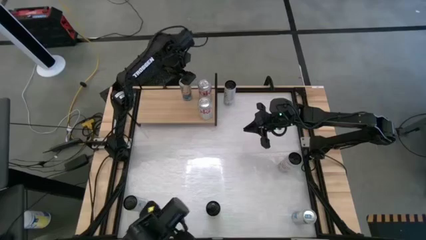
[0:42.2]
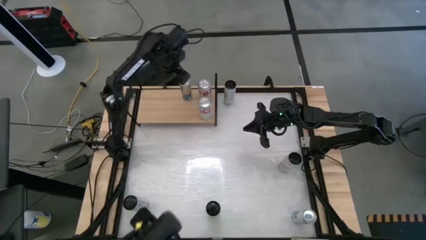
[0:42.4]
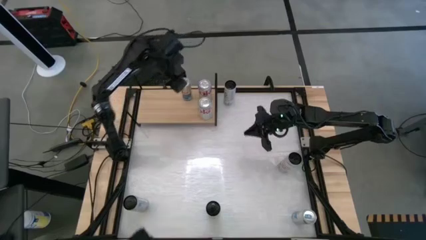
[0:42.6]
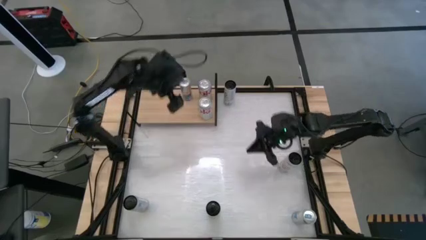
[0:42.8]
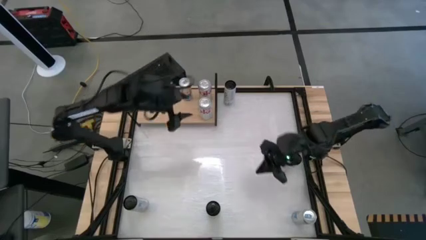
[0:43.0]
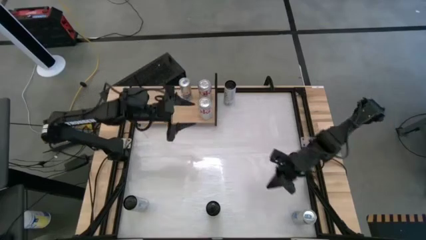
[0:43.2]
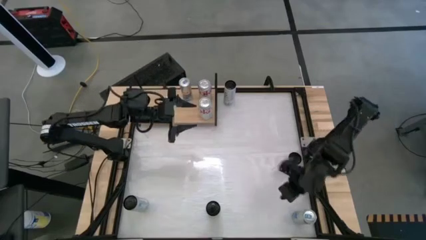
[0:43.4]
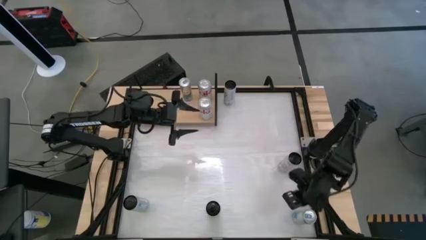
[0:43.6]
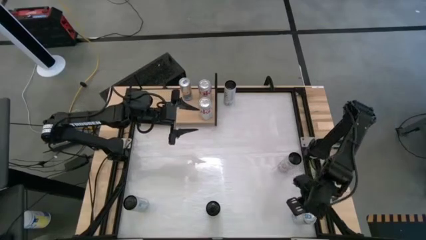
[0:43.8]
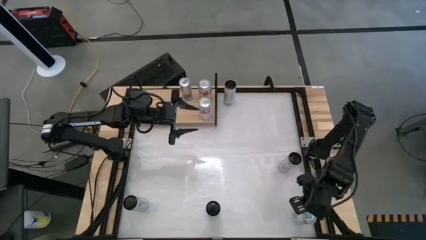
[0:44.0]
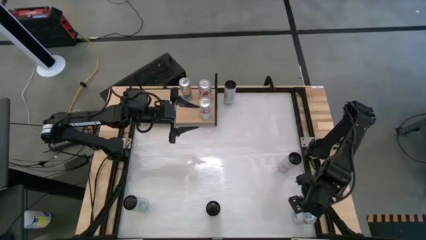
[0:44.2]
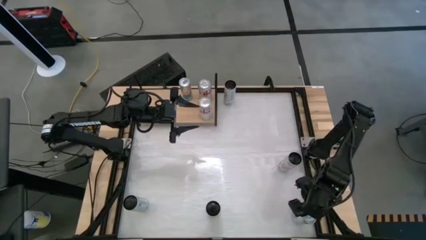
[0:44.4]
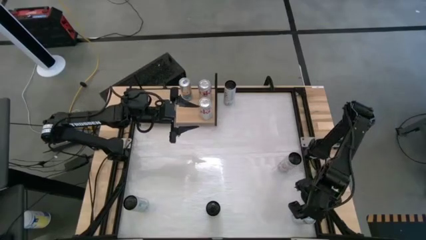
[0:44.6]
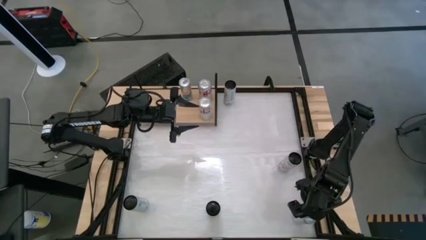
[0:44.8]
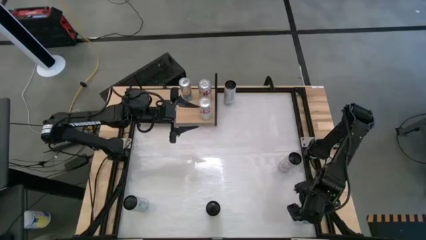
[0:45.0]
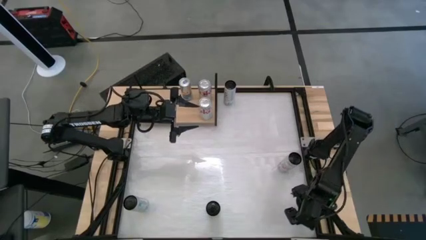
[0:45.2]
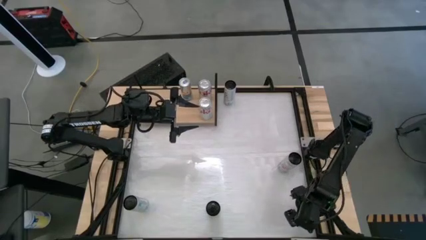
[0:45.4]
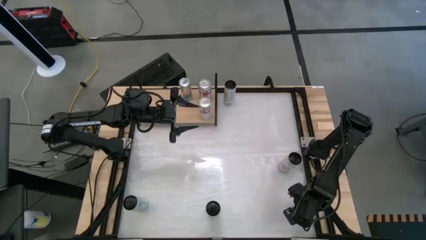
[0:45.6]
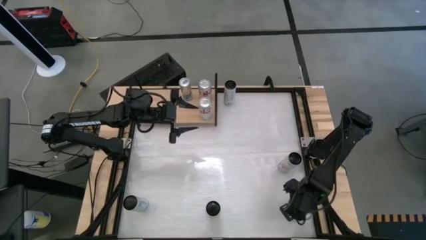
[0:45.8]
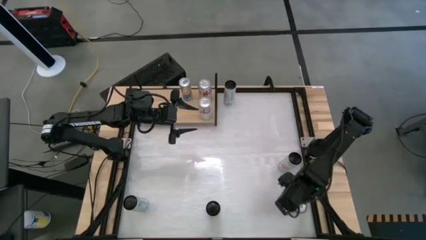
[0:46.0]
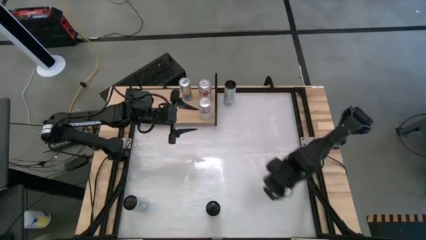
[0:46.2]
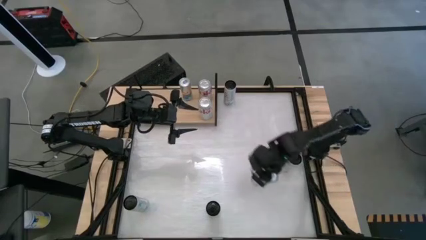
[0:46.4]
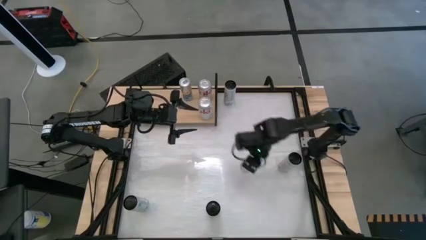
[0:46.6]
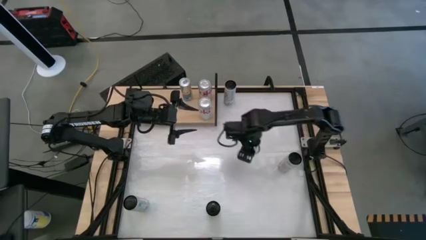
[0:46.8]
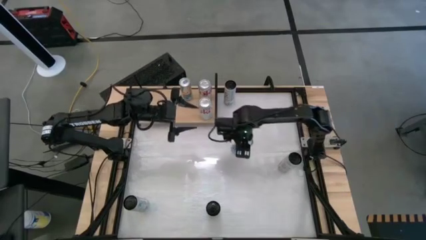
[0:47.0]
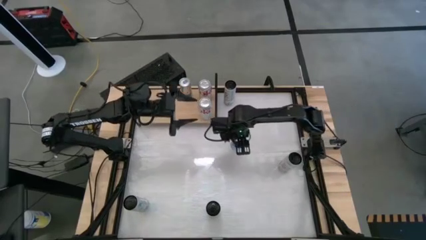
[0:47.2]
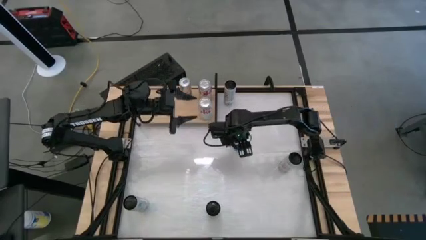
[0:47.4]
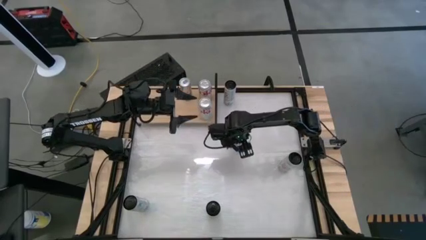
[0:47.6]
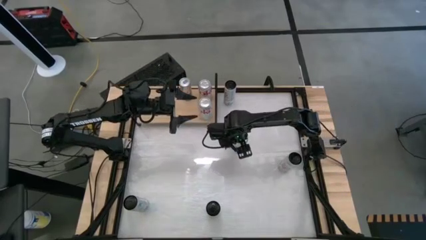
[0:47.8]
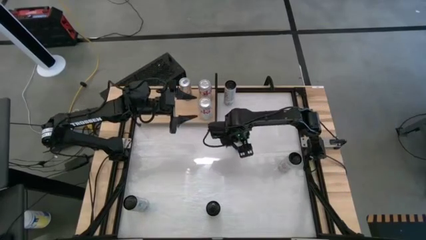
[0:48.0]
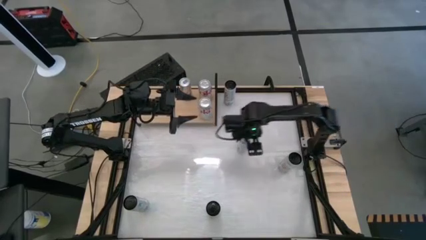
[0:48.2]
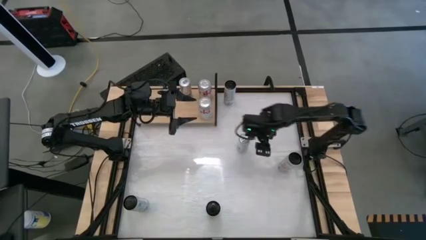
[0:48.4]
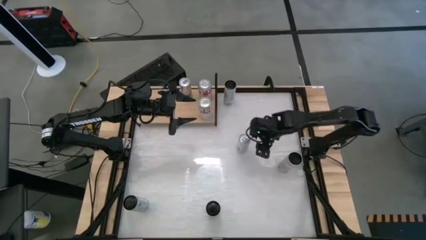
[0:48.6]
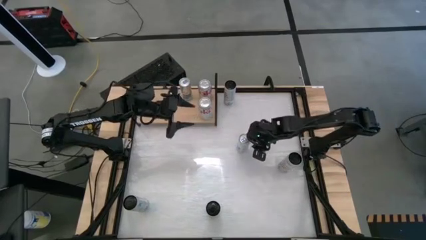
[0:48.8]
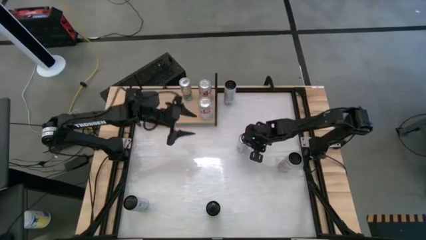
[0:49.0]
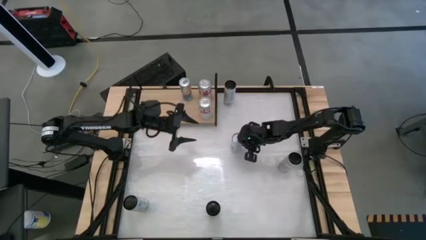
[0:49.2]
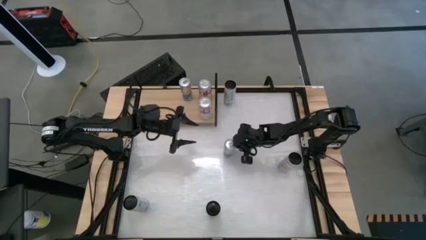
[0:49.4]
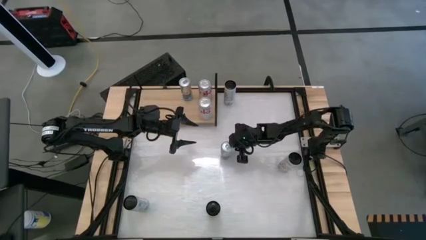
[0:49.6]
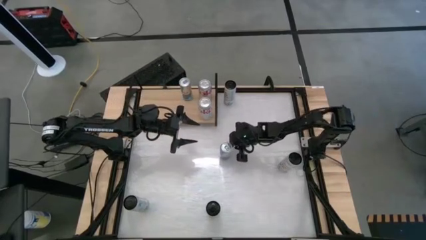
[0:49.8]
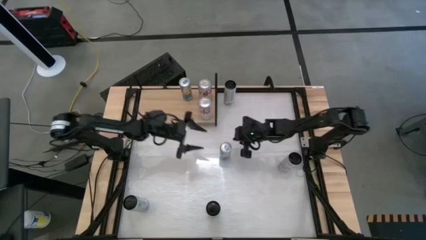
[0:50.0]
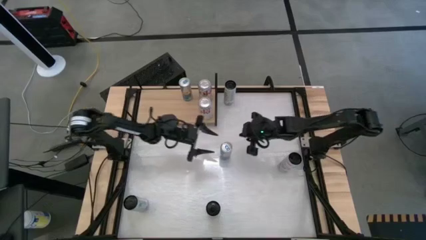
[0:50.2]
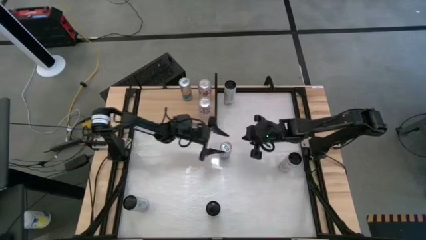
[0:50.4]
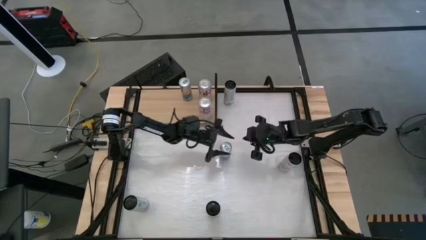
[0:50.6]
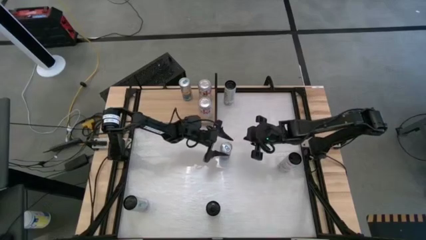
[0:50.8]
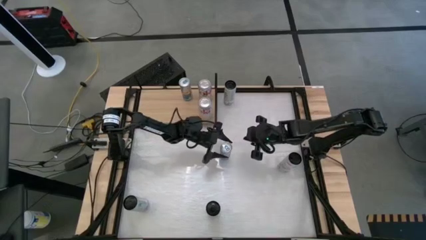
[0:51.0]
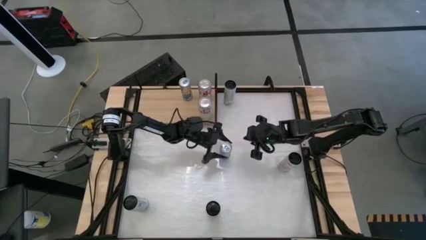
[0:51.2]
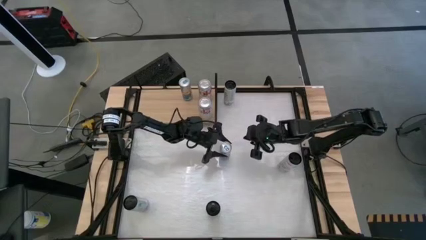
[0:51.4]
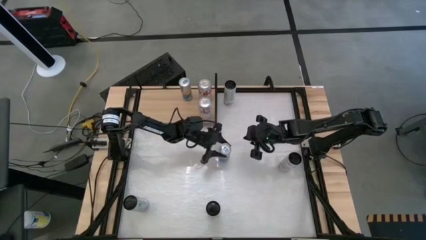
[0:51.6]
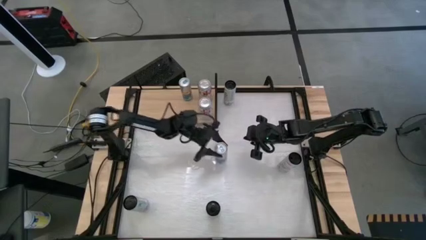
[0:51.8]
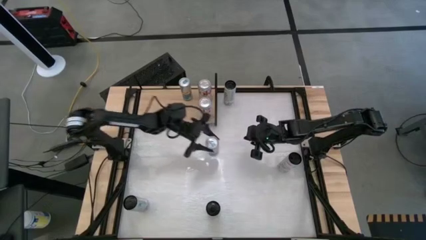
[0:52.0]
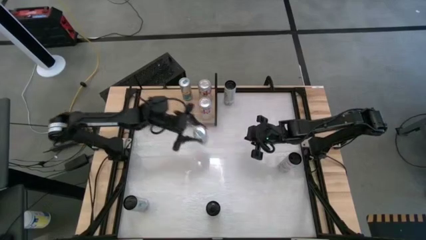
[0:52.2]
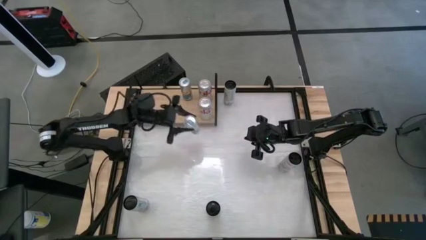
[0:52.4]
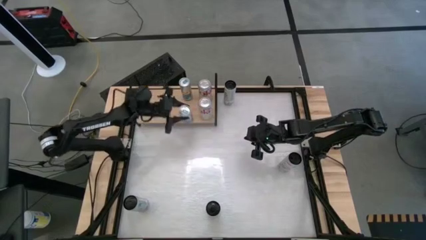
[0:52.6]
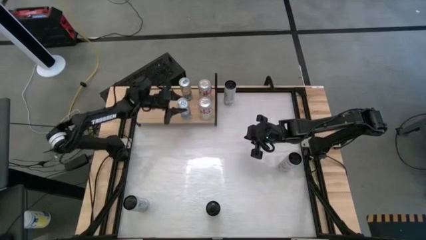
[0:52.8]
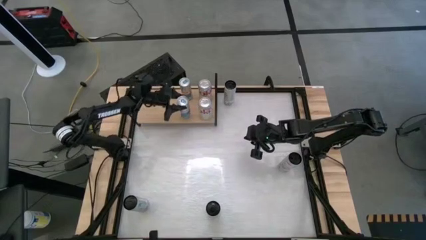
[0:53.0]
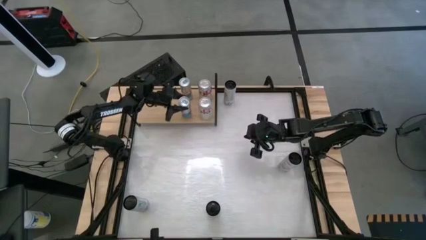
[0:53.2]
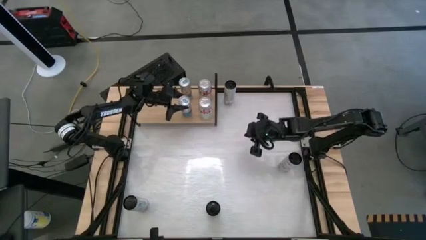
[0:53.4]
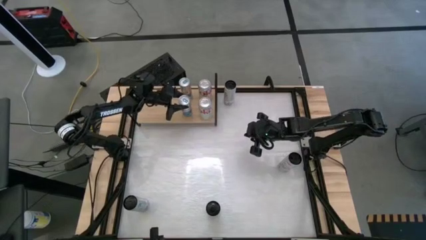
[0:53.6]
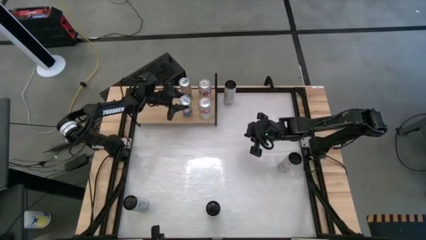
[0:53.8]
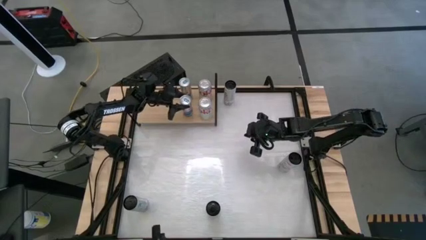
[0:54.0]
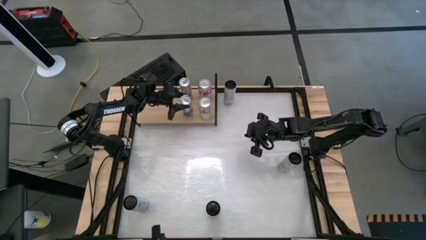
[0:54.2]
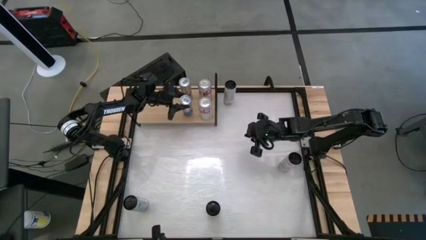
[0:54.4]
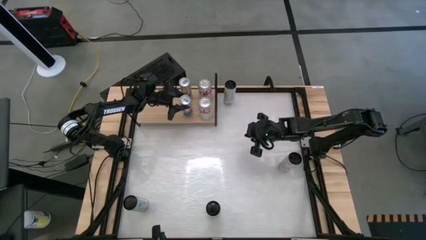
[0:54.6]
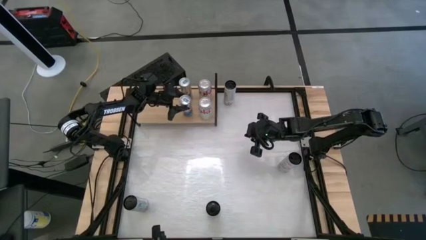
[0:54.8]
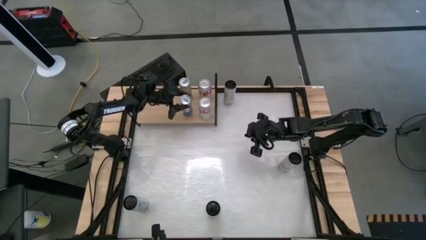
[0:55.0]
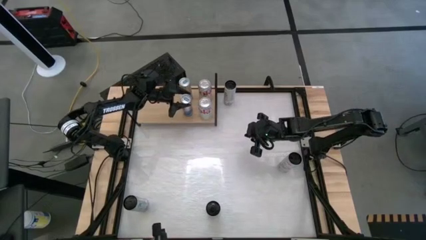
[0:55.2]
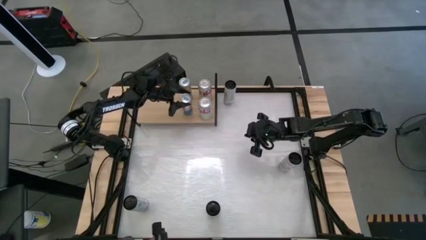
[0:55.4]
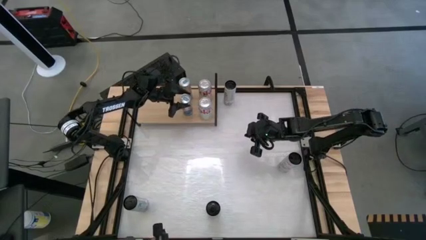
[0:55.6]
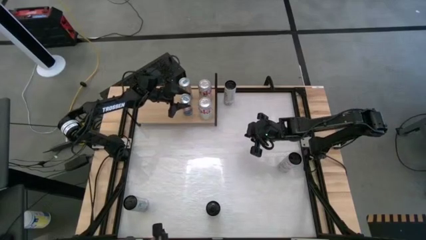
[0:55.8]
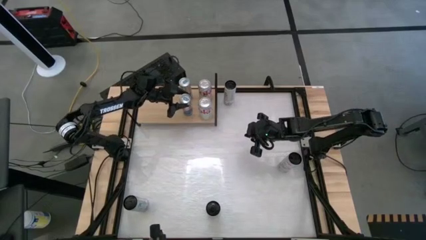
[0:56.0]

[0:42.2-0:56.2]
Task: Place canned beverage on shelf
Put the blue soda can on the shelf aligned with the other blue soda can

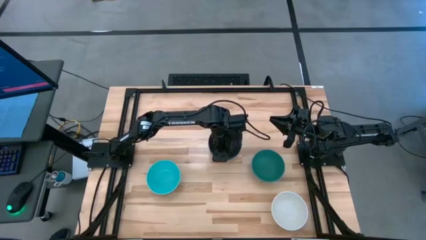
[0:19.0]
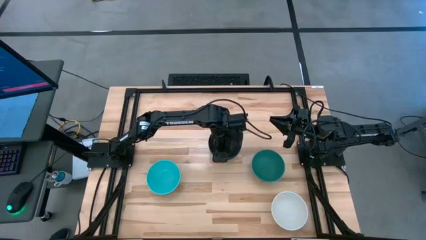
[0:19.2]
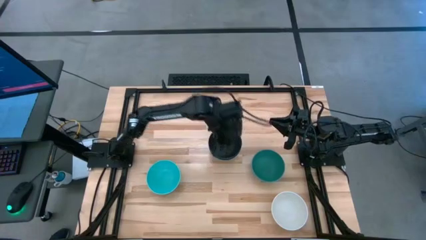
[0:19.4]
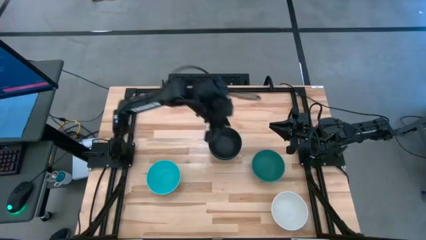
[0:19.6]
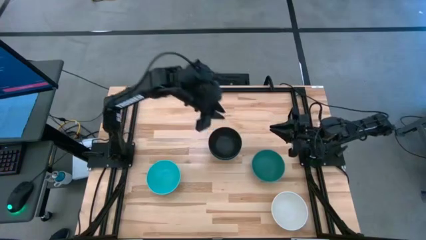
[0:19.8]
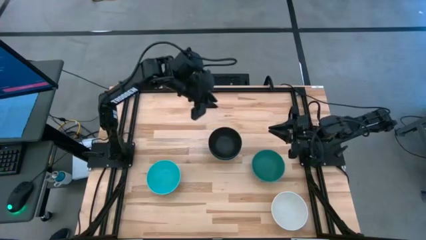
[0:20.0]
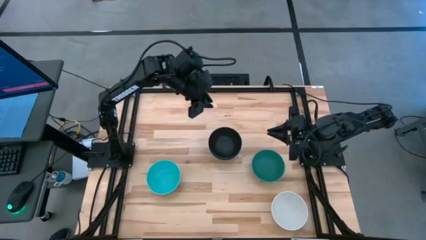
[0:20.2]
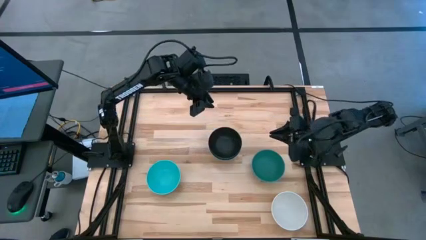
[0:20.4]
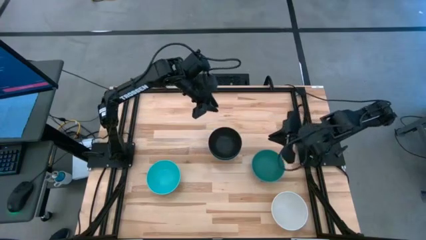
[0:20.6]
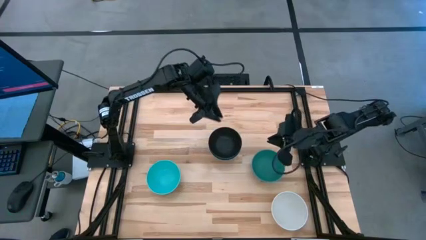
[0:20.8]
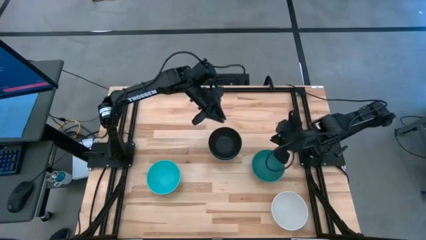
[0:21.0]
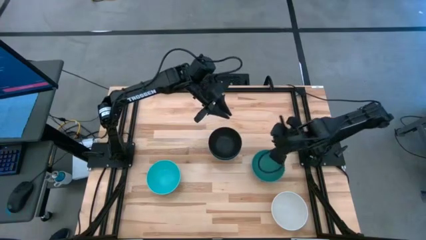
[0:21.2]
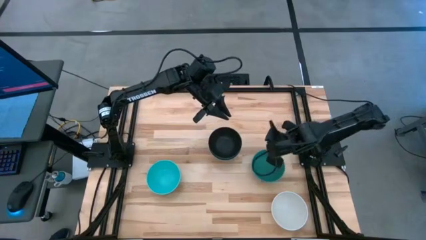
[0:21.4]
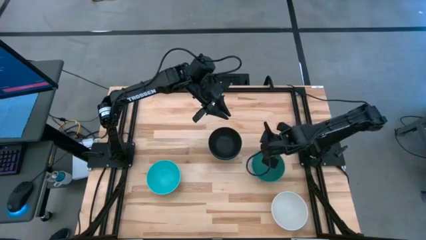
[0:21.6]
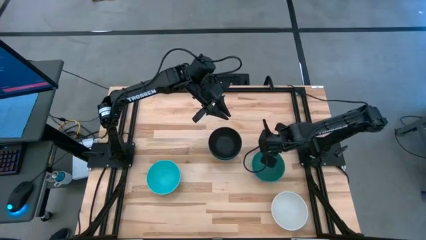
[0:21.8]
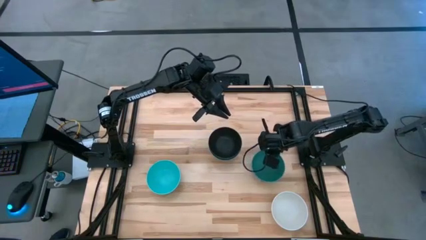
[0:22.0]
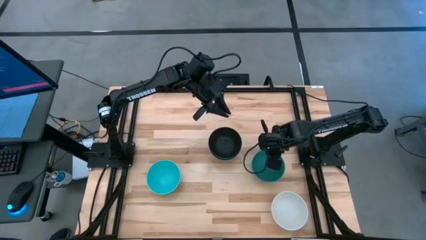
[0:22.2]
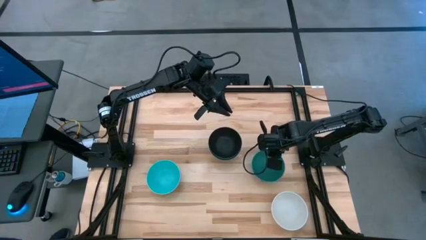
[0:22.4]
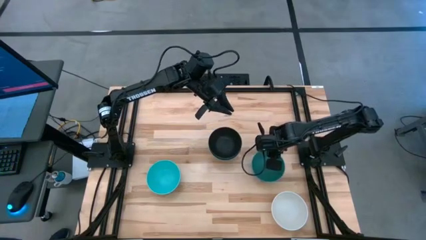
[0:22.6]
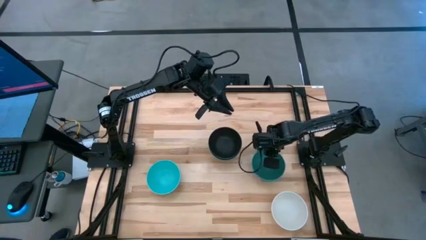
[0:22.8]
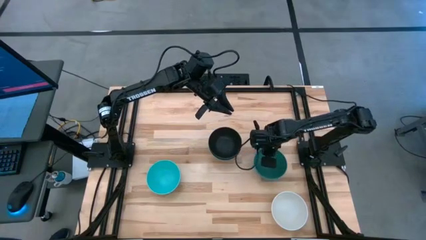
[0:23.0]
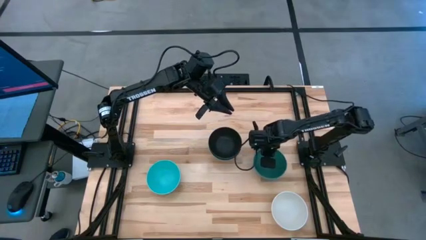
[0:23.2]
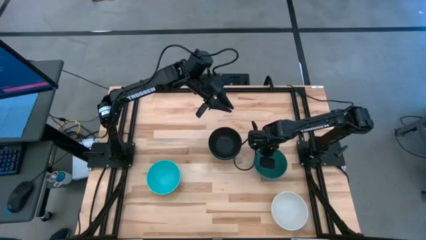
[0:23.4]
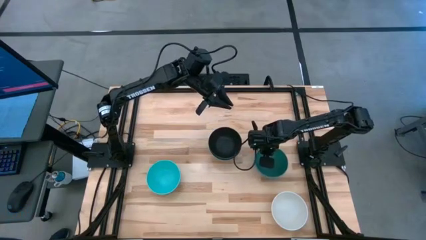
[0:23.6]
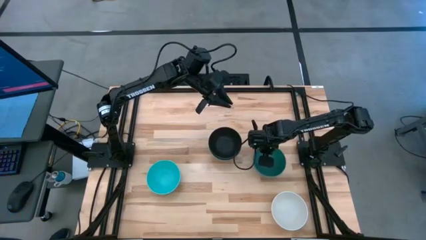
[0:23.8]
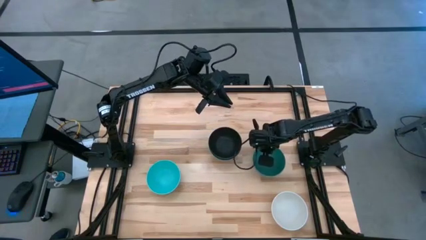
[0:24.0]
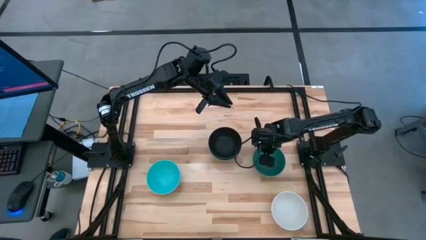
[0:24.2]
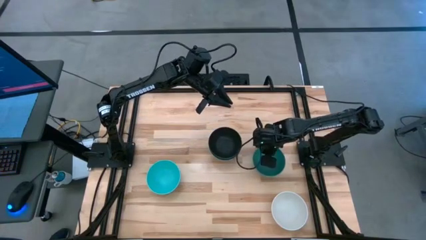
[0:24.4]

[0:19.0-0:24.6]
Task: Nest bowls inside each other
Stack the green bowl on the black bowl
